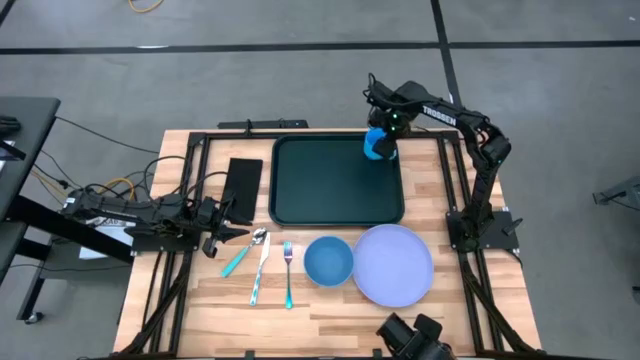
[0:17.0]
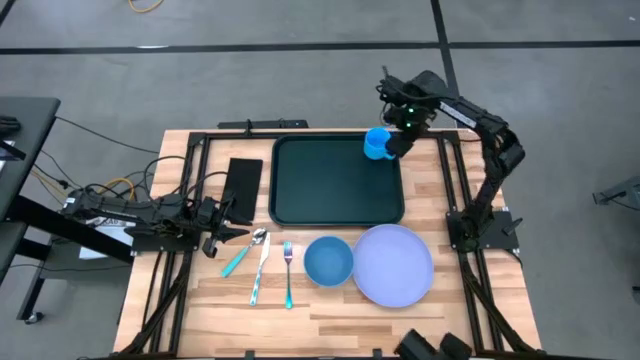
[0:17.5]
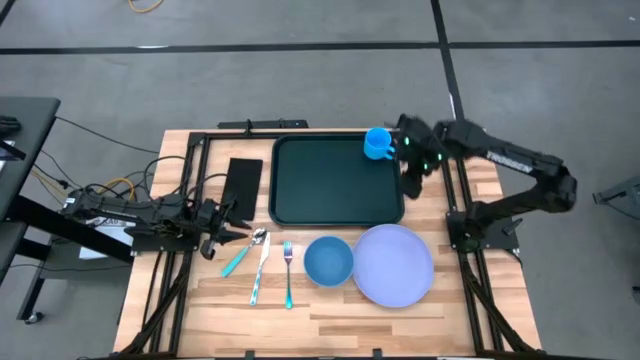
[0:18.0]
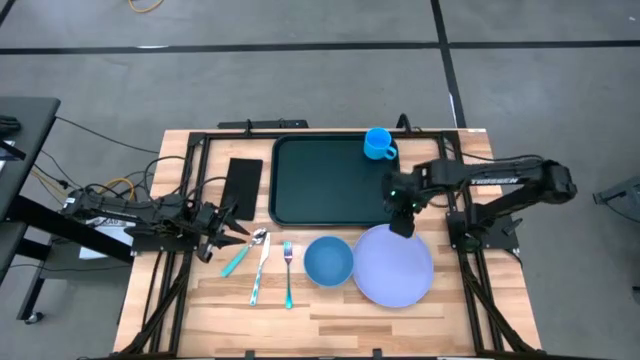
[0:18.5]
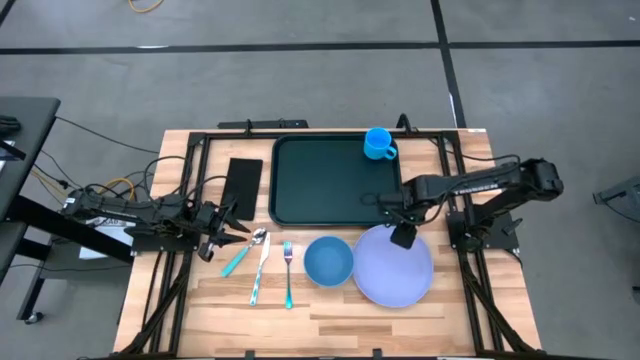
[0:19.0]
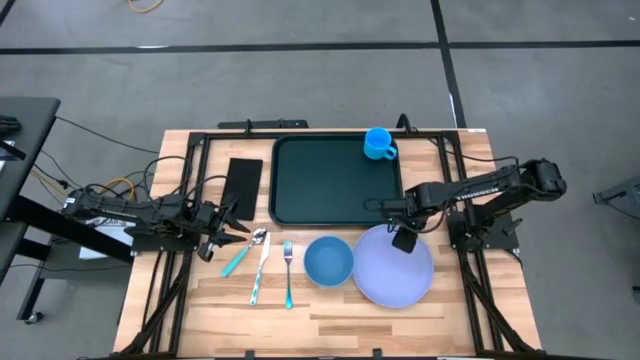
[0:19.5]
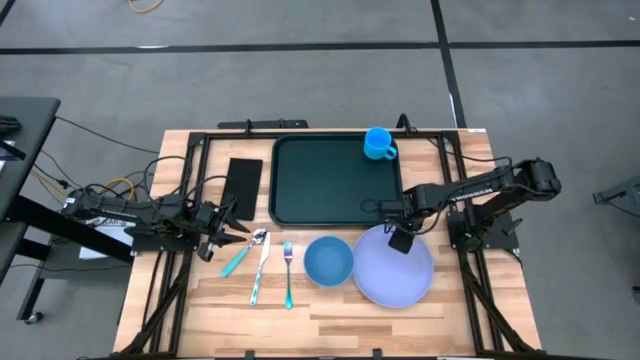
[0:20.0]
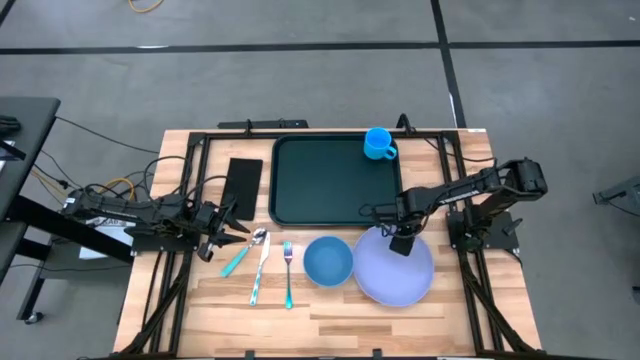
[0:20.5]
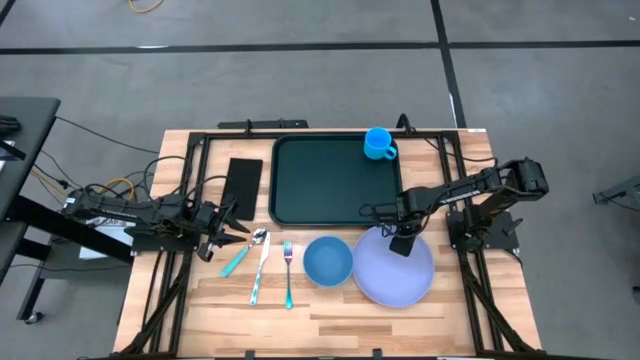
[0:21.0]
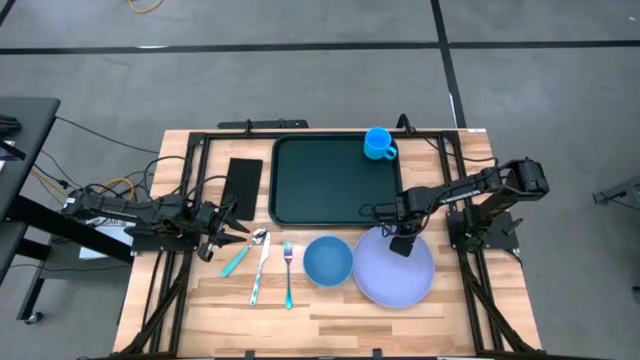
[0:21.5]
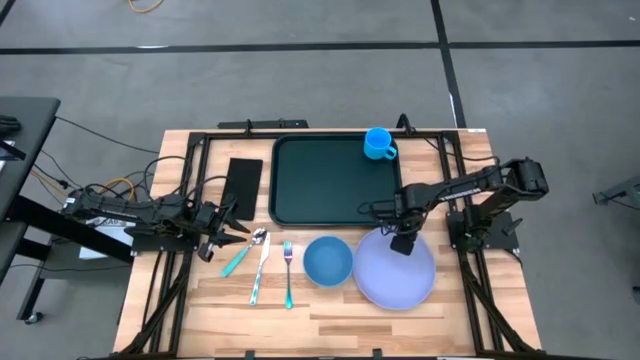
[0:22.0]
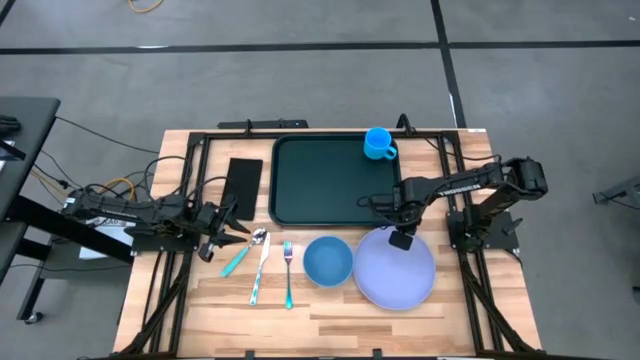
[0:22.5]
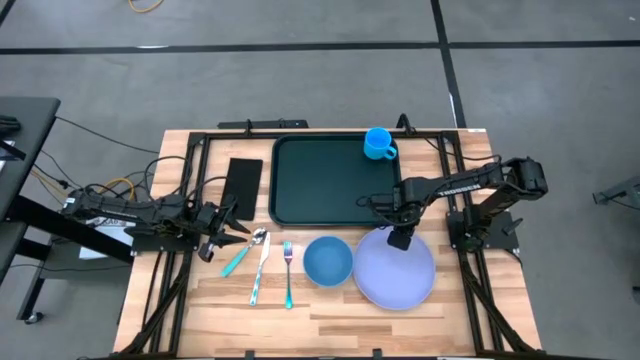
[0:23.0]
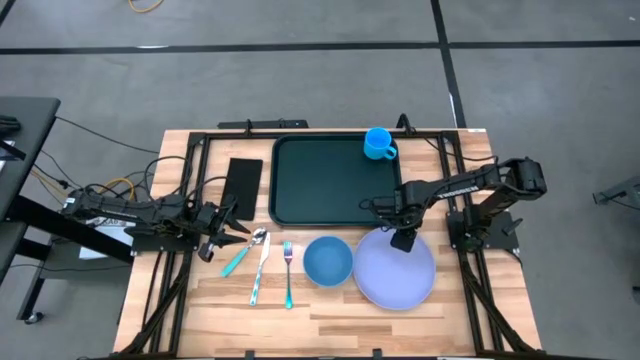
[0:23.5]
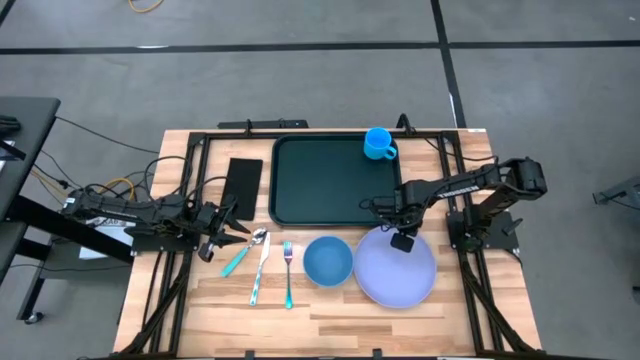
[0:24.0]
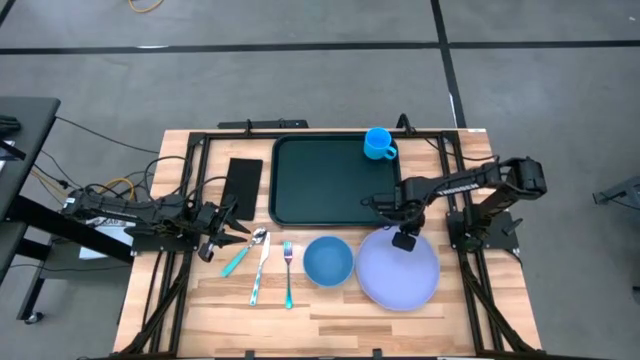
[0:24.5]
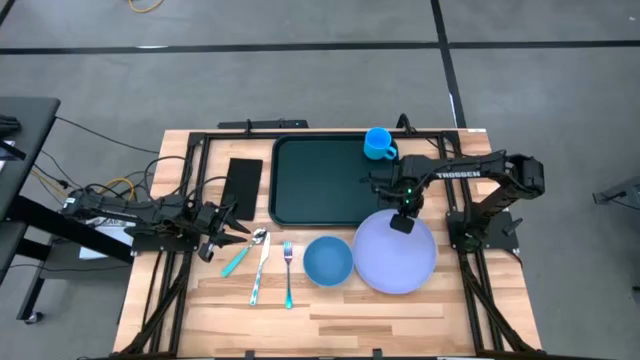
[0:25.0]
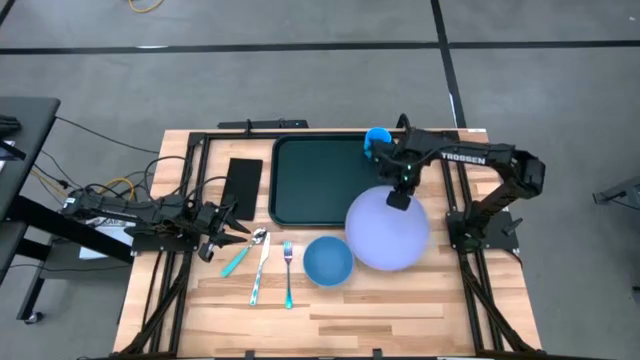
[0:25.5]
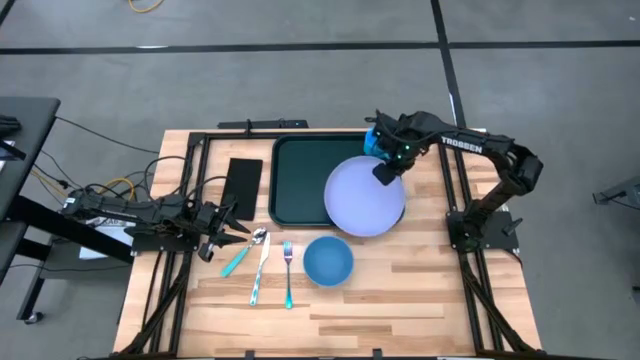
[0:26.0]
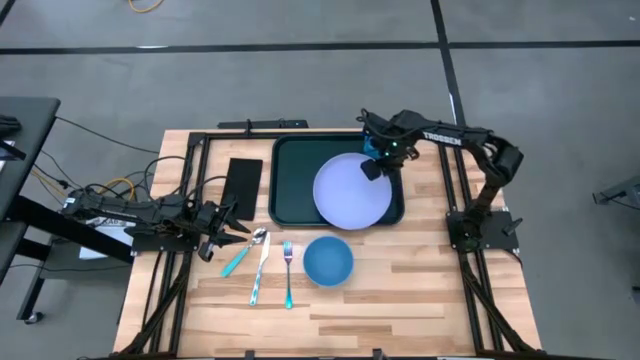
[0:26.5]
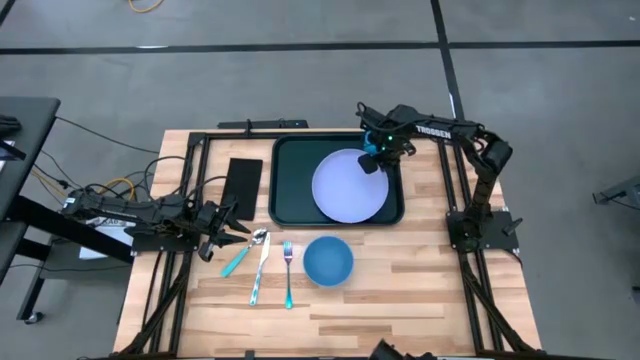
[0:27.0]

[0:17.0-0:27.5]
Task: Set up tray
Put the purple plate on the black serving tray below the light blue mug

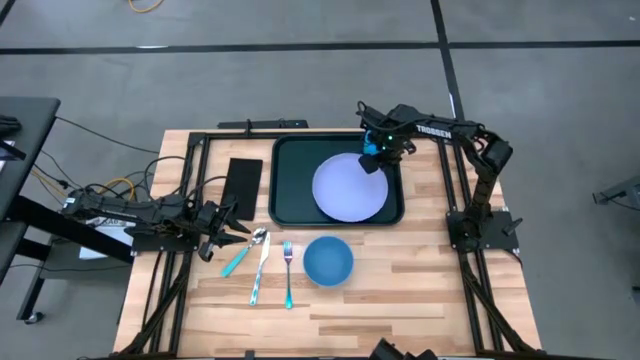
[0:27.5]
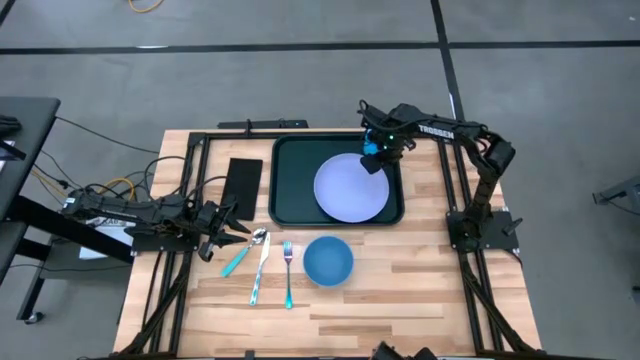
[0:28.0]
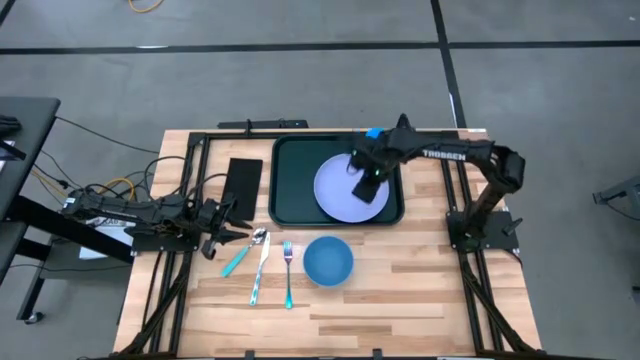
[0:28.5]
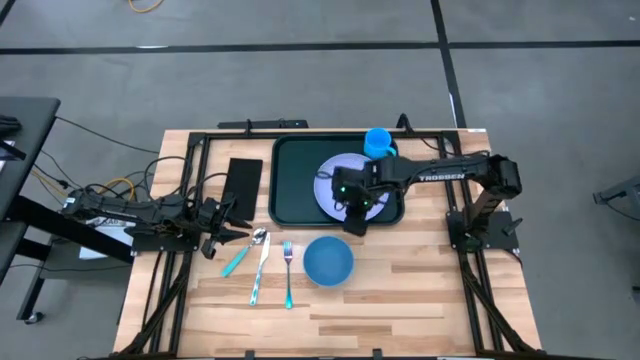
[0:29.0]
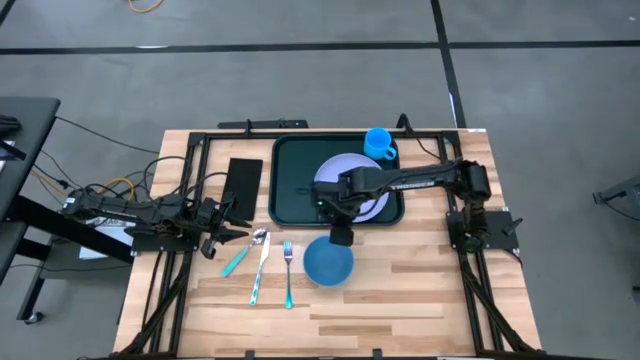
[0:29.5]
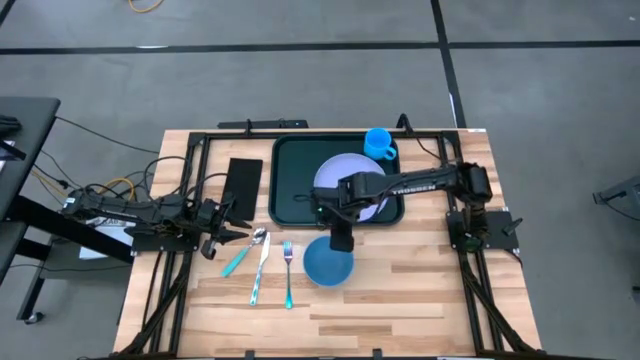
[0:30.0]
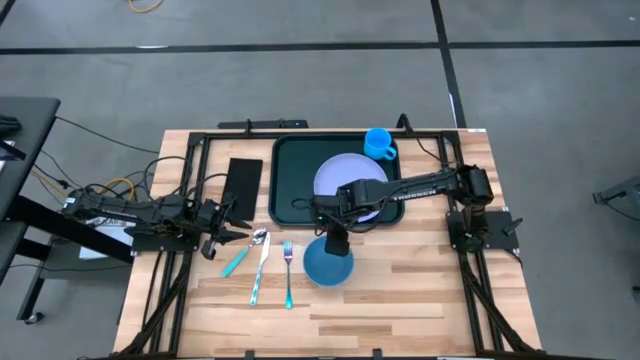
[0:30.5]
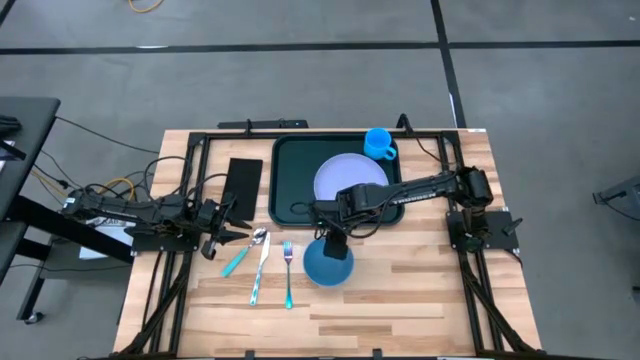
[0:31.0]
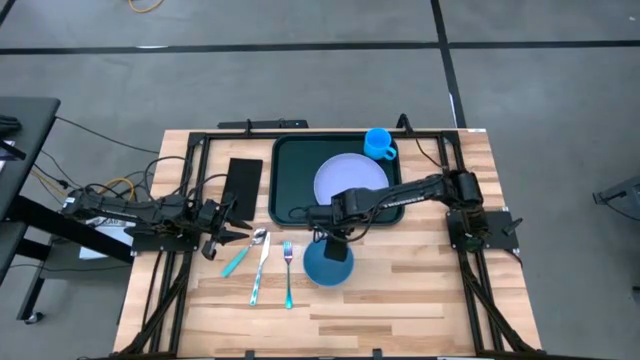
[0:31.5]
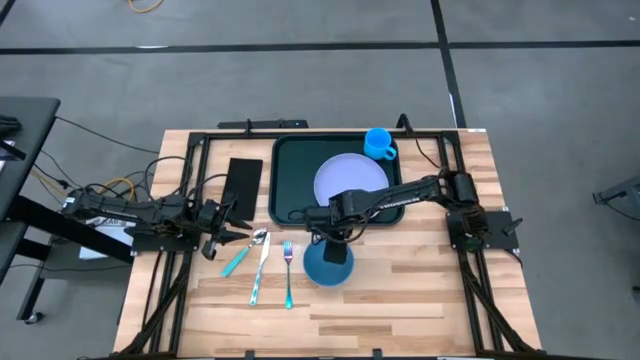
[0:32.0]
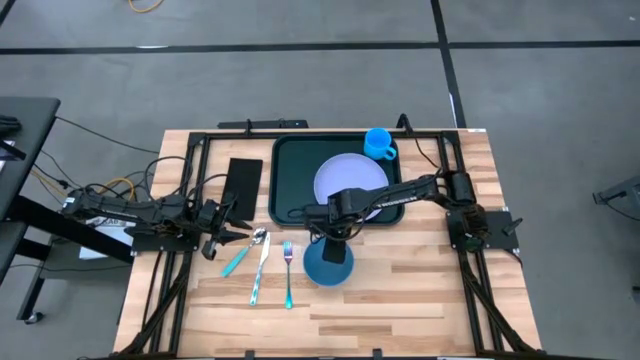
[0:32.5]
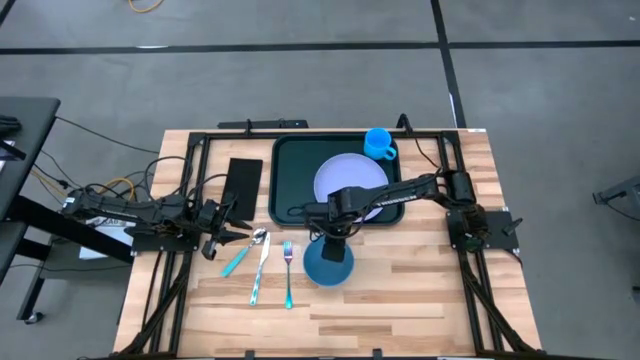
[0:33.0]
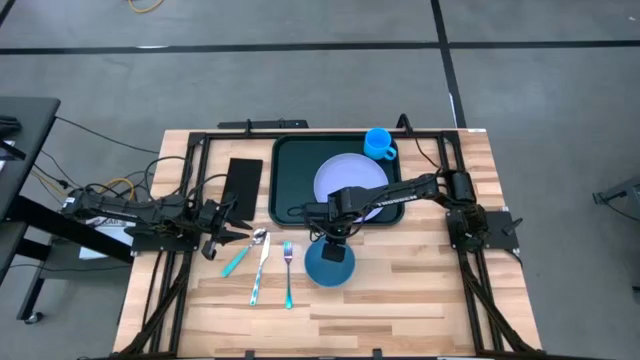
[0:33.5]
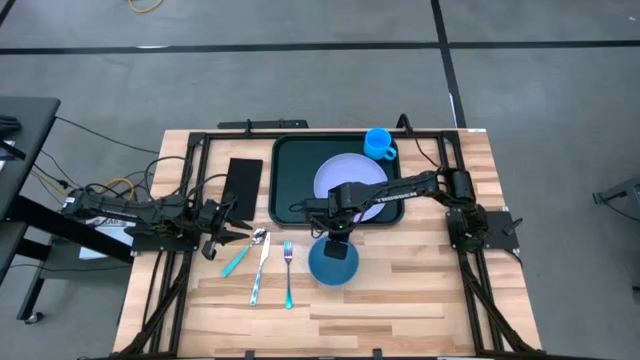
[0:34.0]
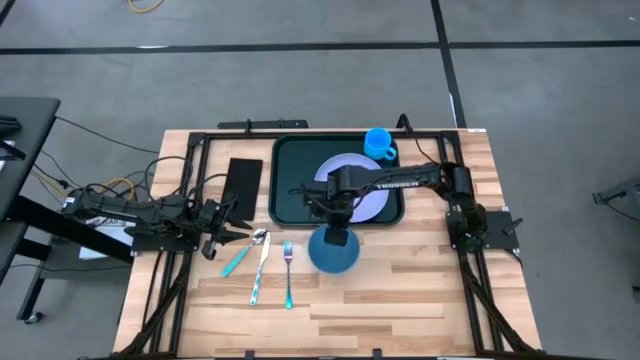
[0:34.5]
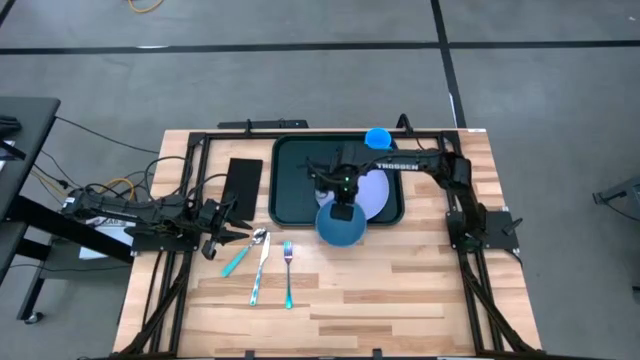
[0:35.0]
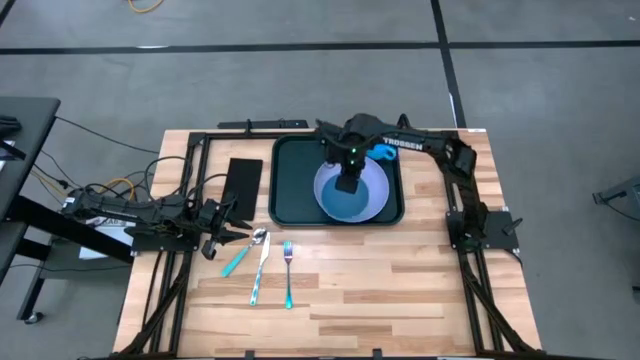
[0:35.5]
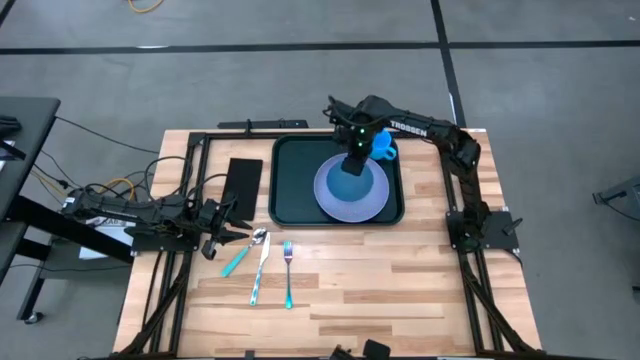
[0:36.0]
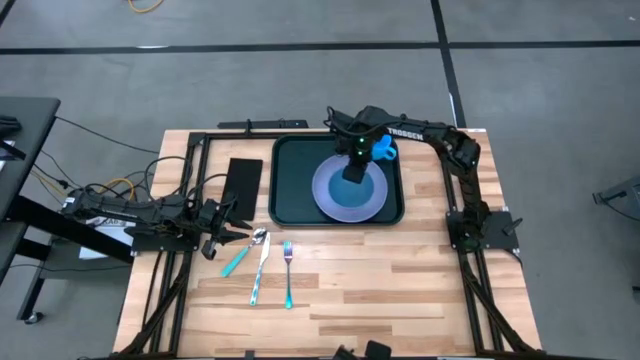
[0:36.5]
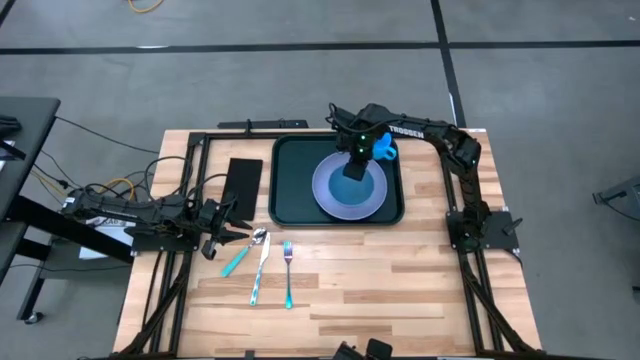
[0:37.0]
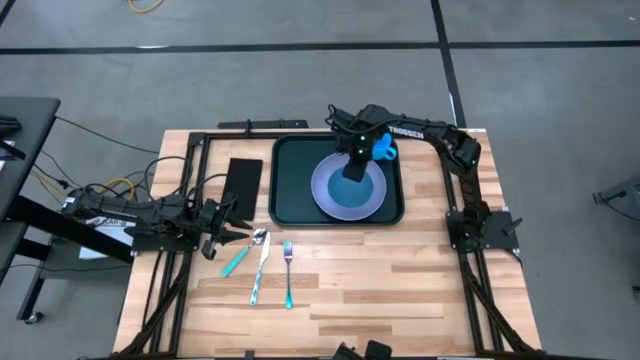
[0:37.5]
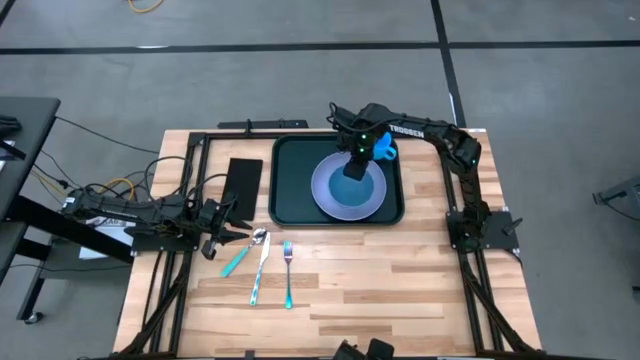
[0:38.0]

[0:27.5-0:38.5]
Put the blue bowl on top of the purple plate
